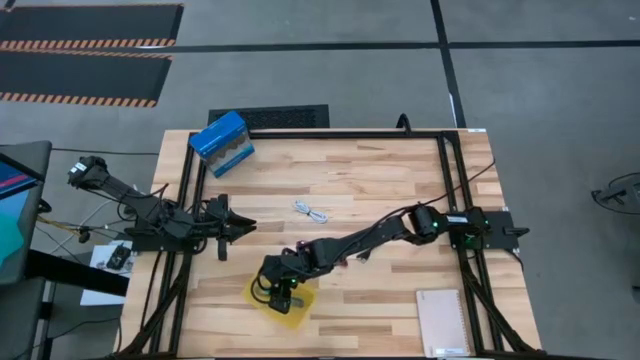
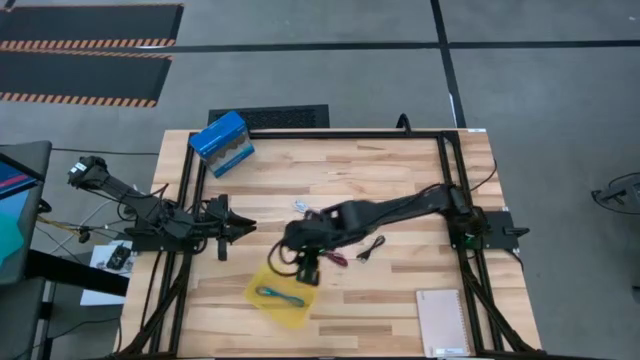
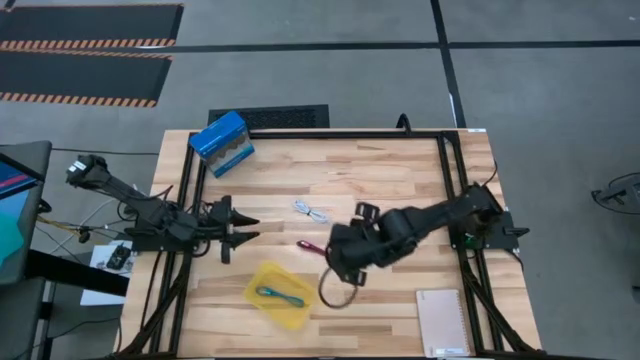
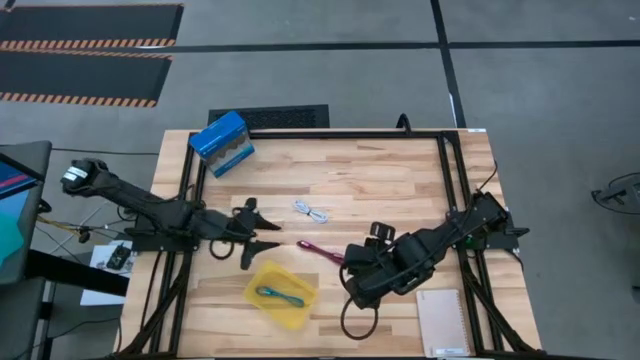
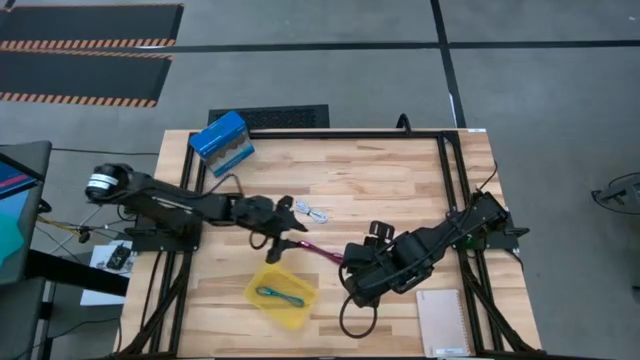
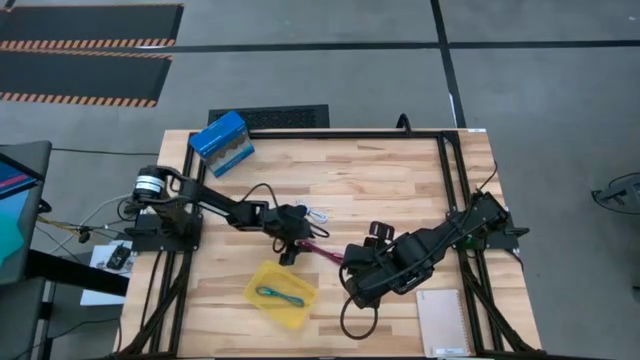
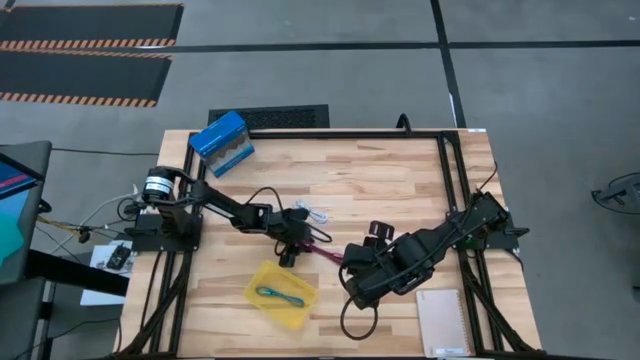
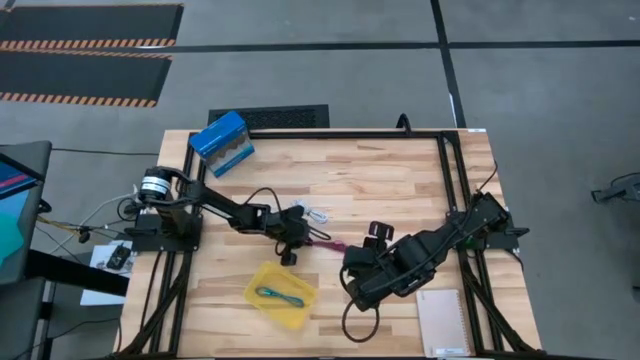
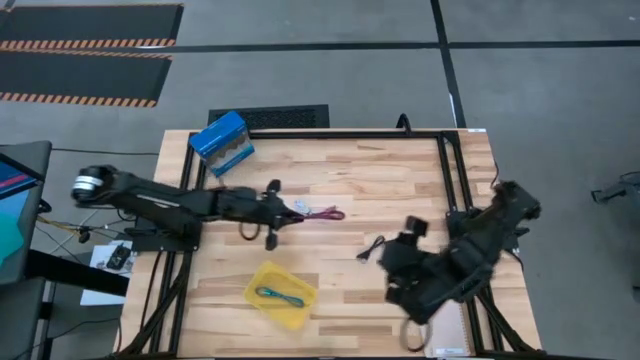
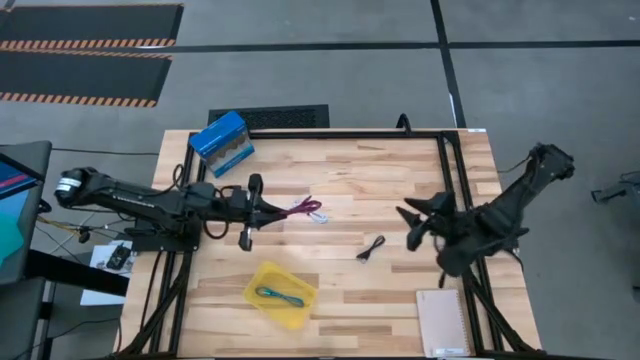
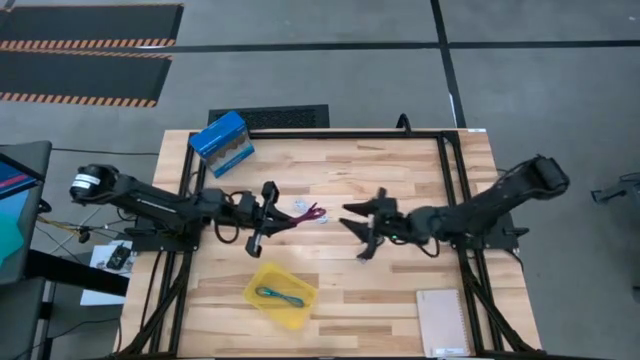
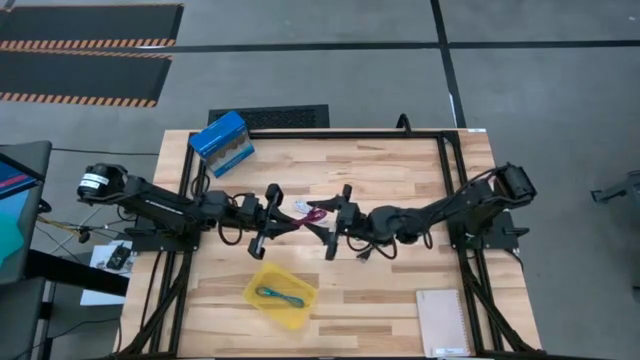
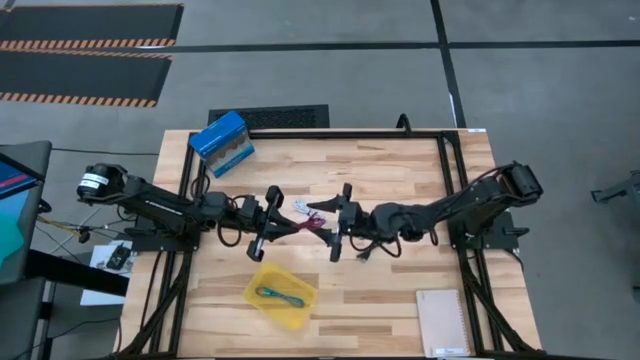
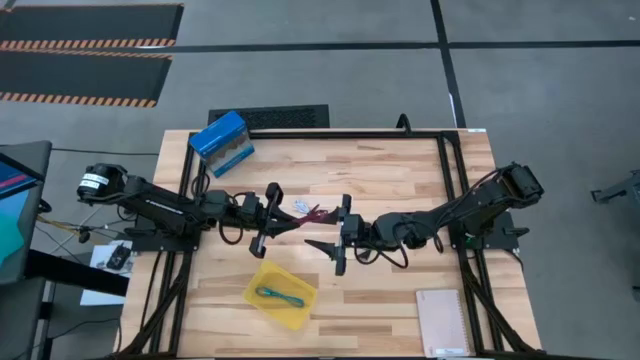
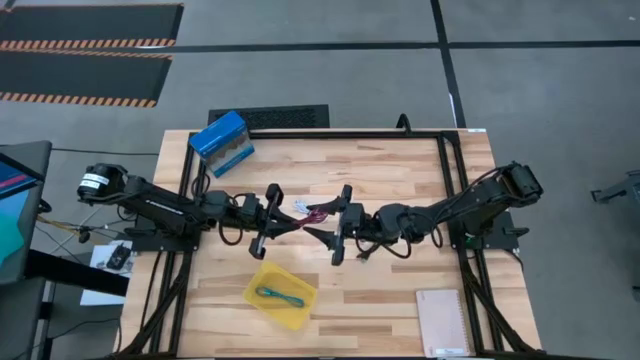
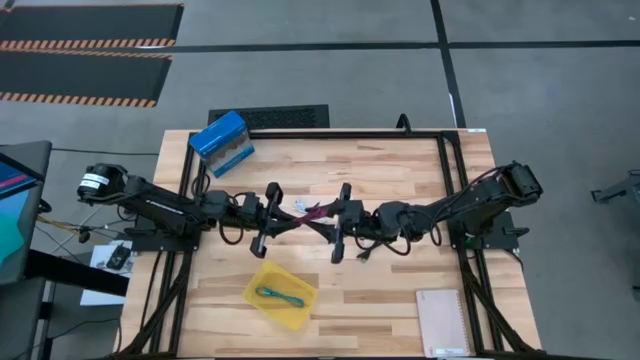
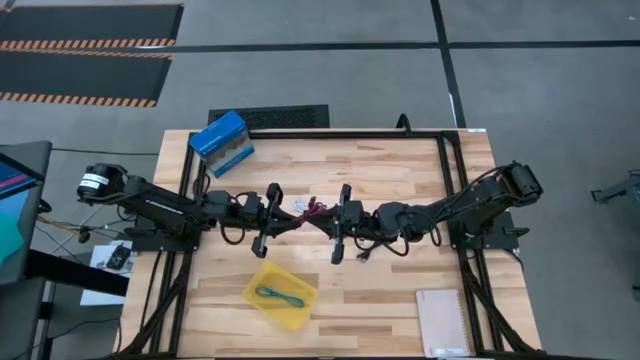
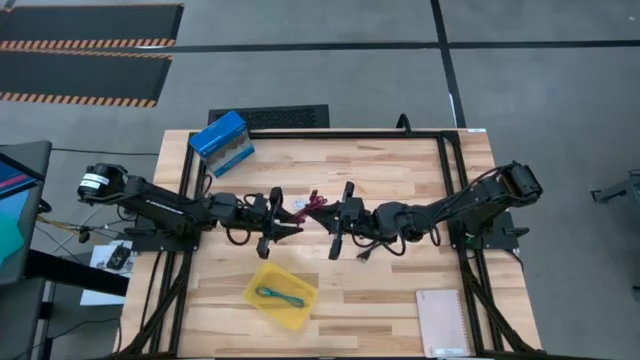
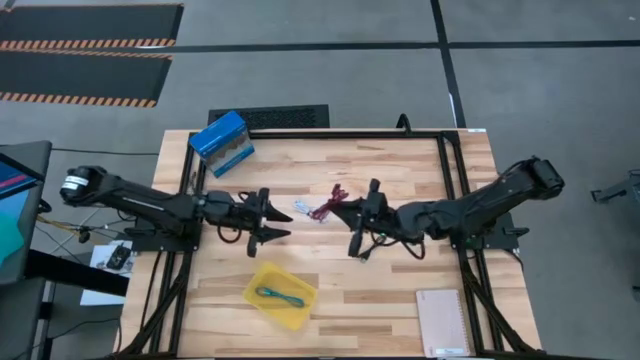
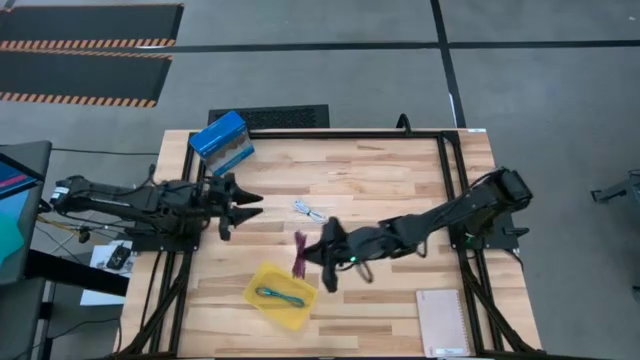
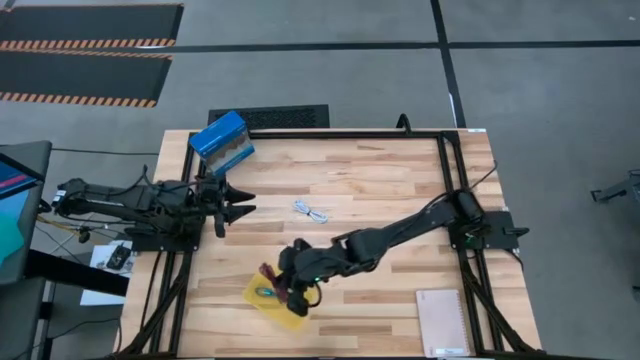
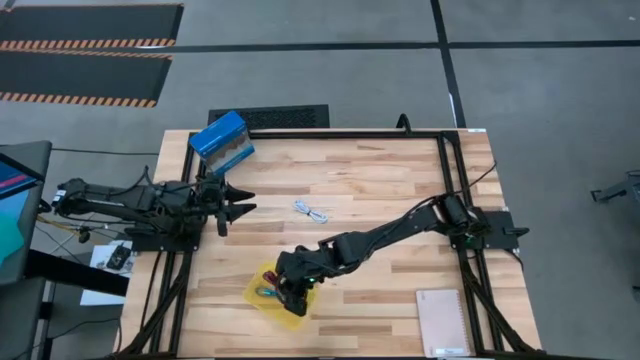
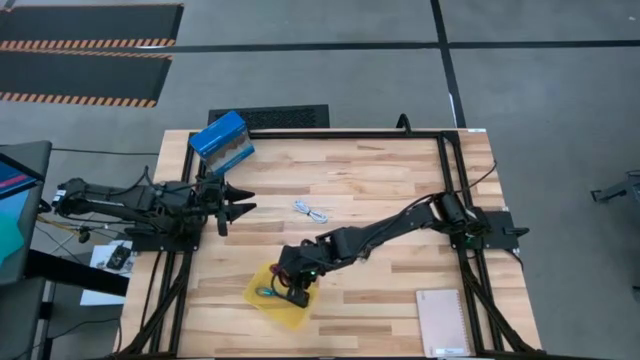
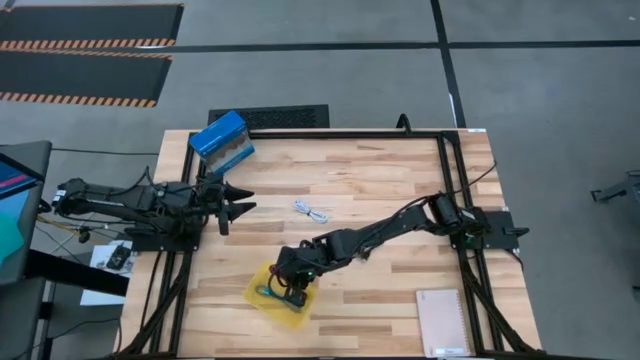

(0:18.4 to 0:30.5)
Task: Pick and place USB-C Cables
Put the pink black charger cable into the yellow transparent bin

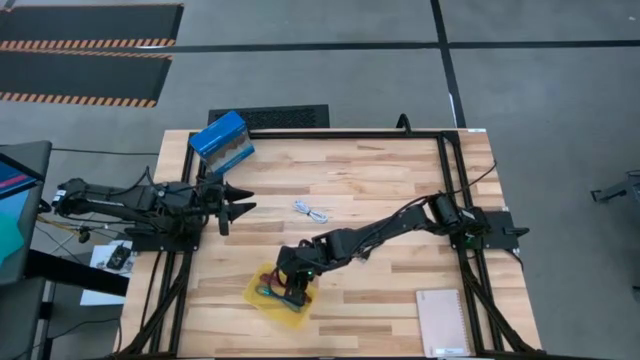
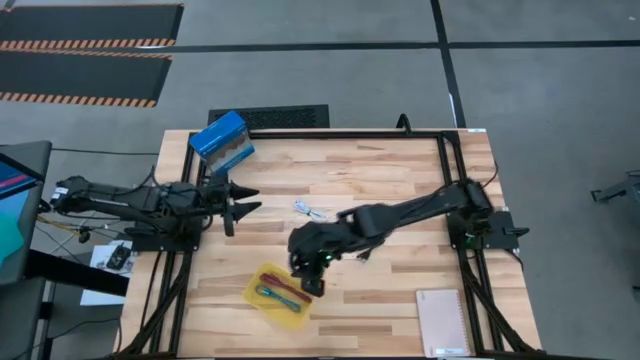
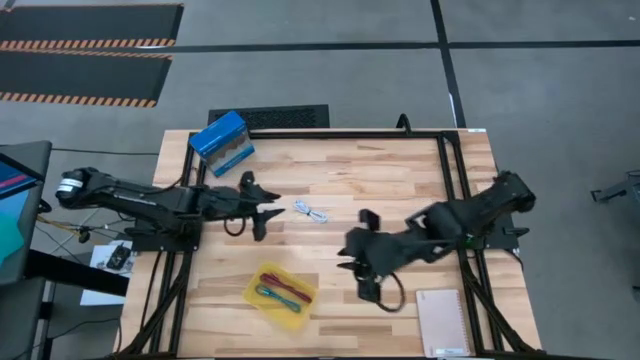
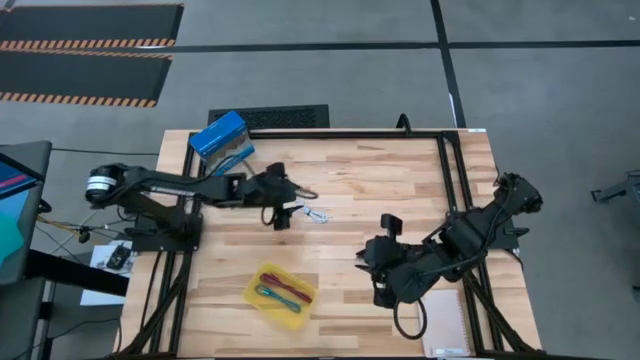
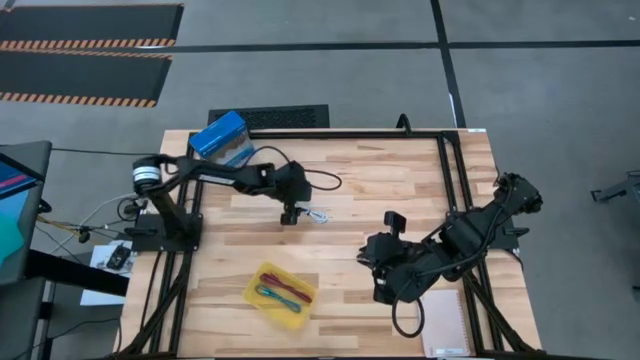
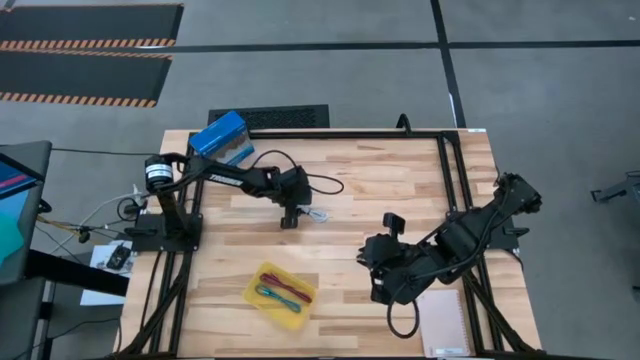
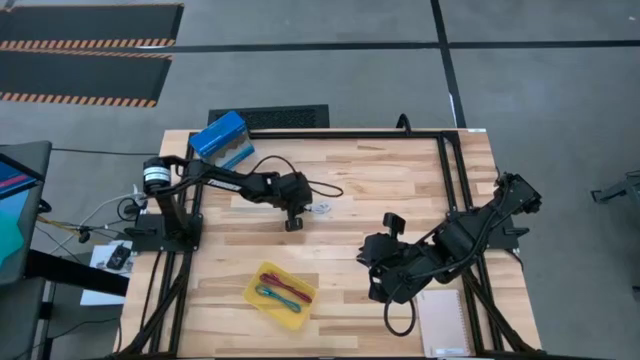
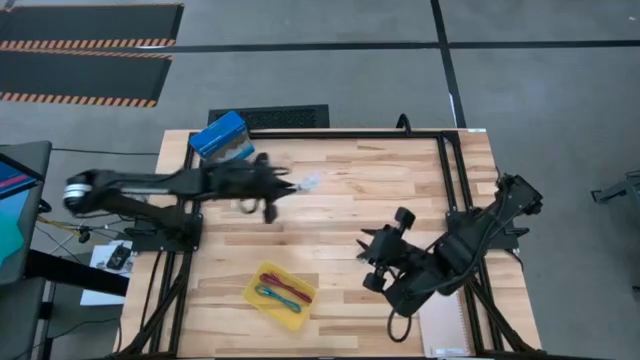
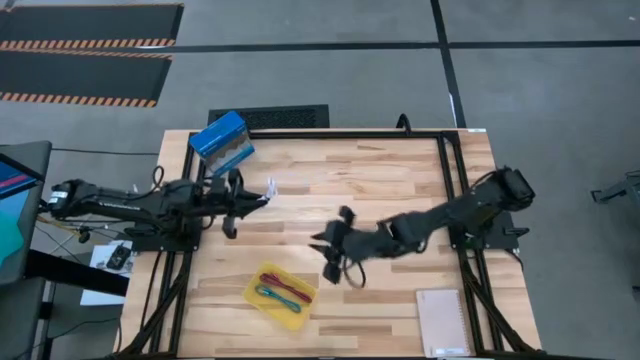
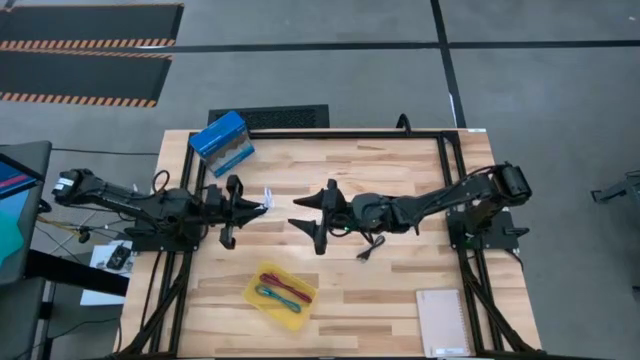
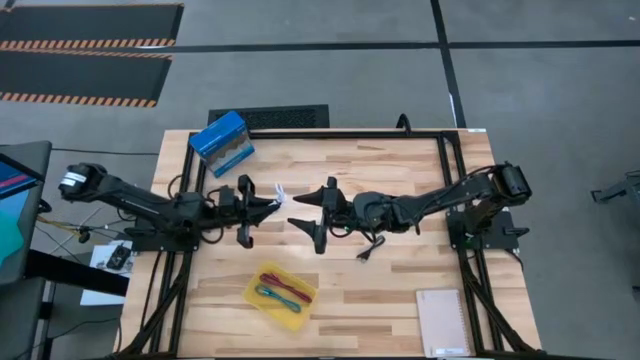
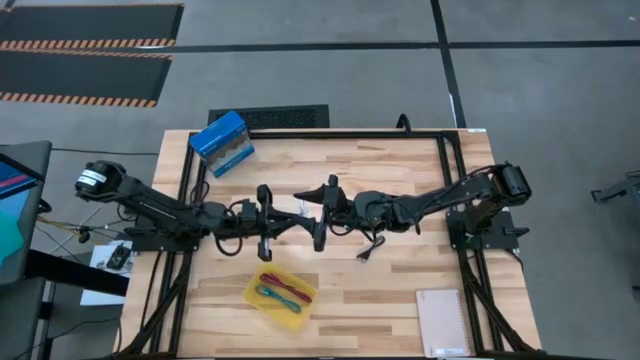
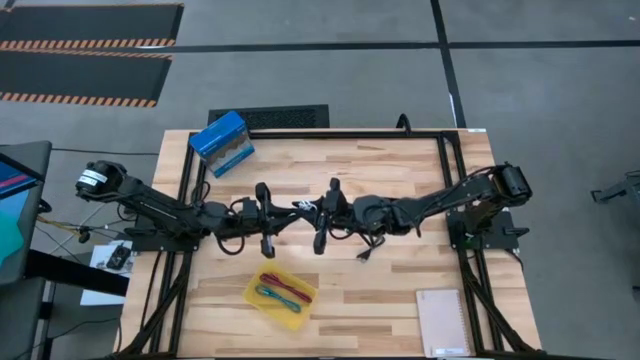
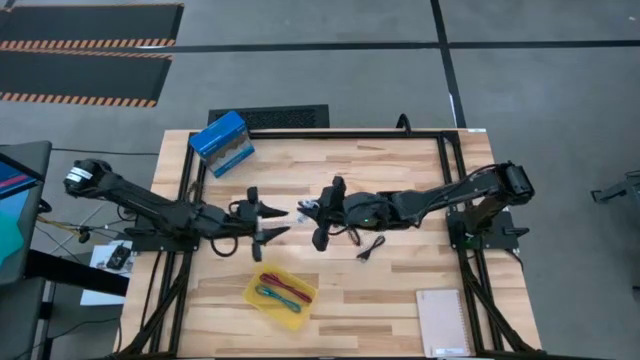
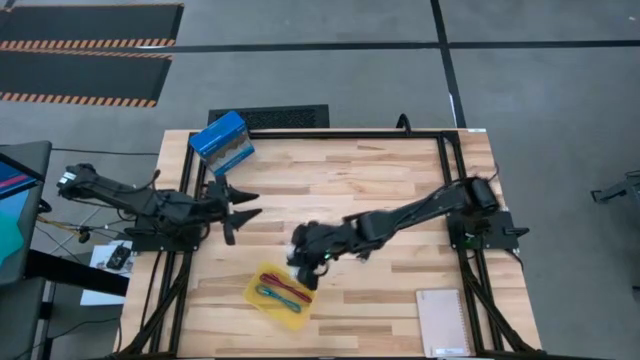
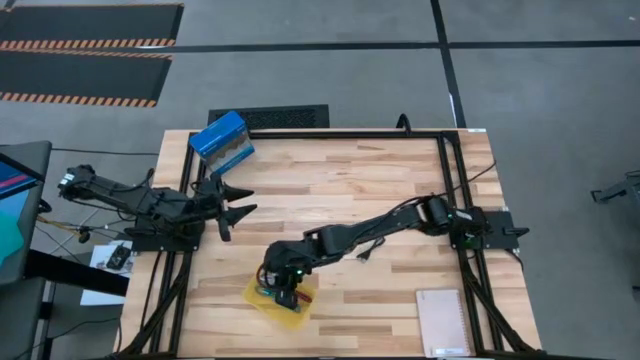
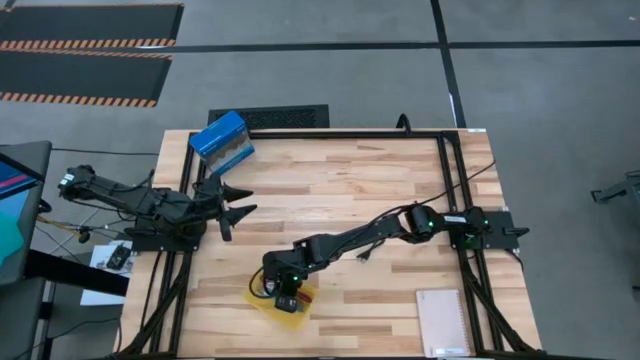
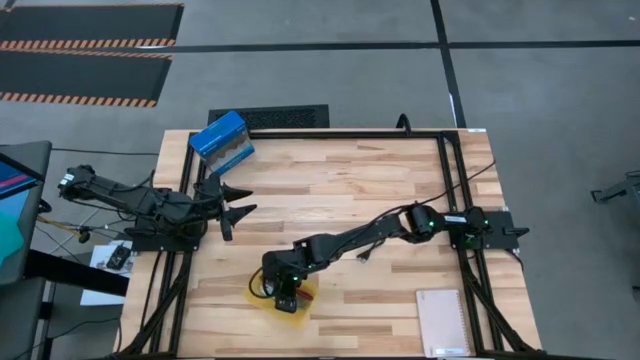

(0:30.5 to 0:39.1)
Put the white charger cable into the yellow transparent bin
